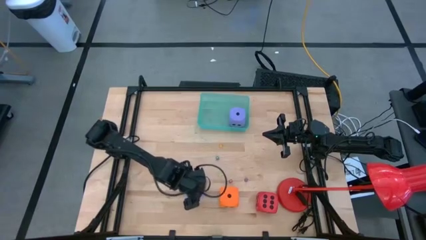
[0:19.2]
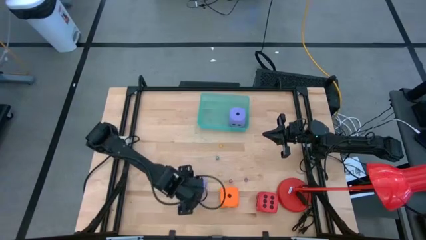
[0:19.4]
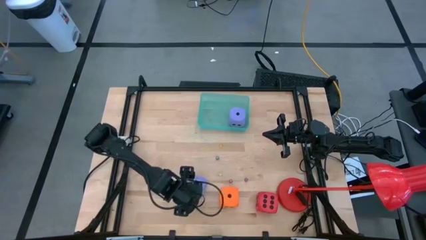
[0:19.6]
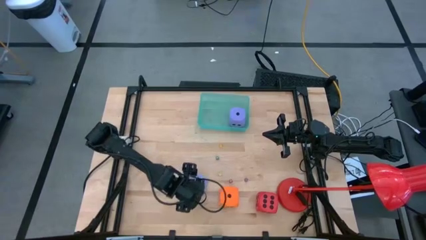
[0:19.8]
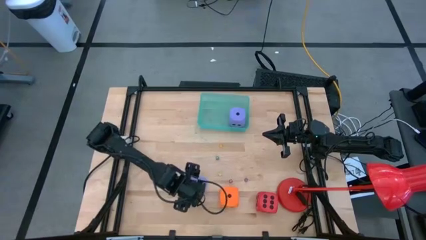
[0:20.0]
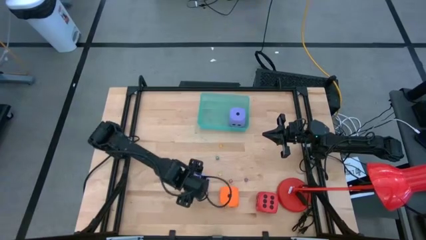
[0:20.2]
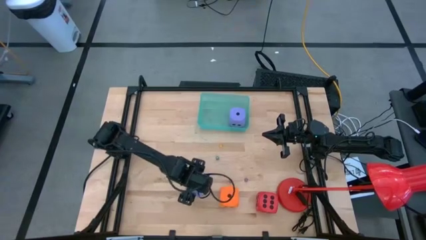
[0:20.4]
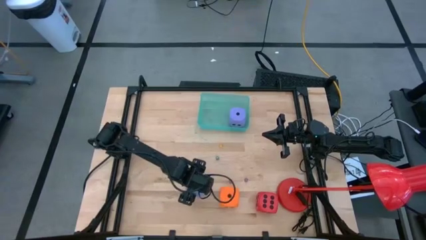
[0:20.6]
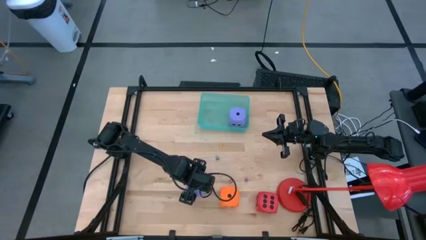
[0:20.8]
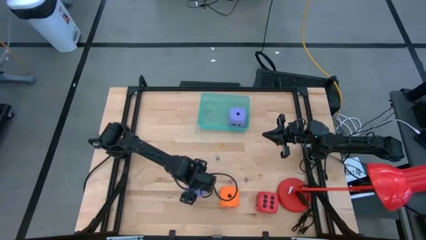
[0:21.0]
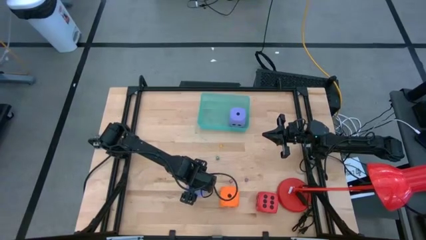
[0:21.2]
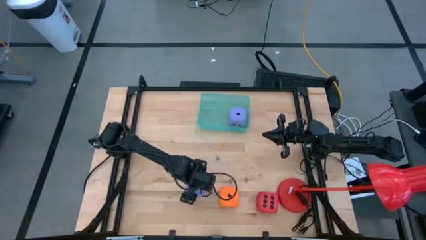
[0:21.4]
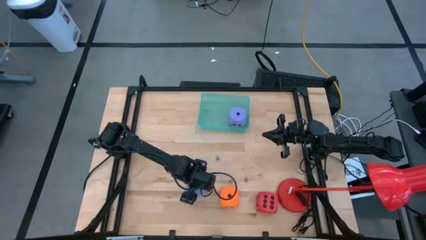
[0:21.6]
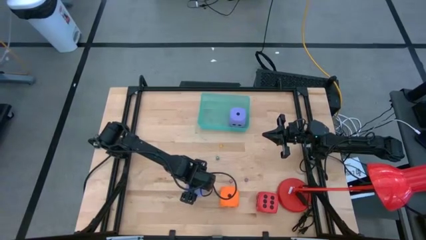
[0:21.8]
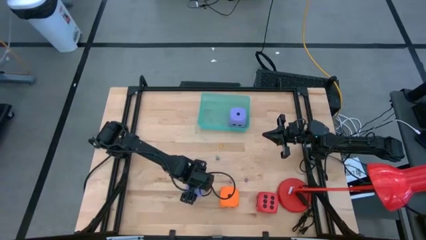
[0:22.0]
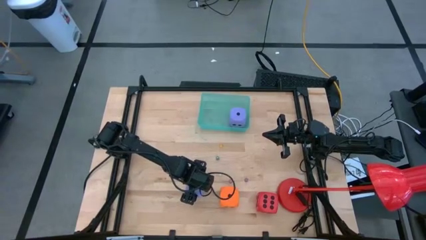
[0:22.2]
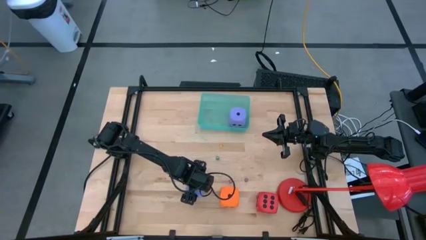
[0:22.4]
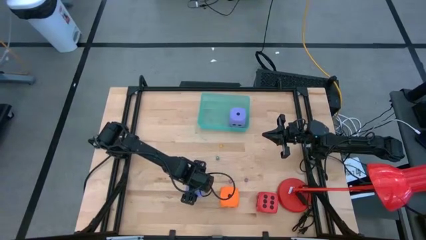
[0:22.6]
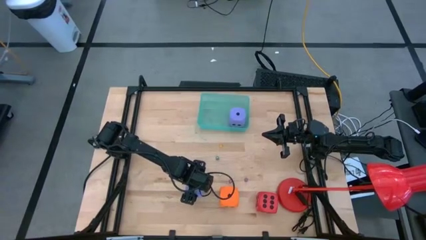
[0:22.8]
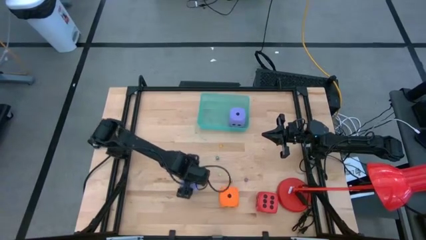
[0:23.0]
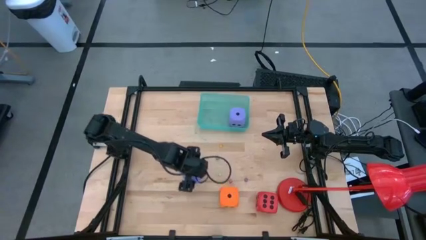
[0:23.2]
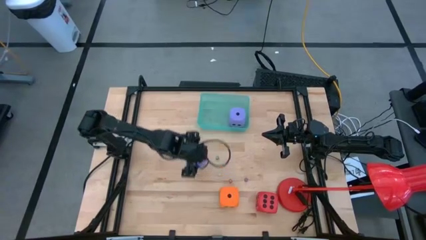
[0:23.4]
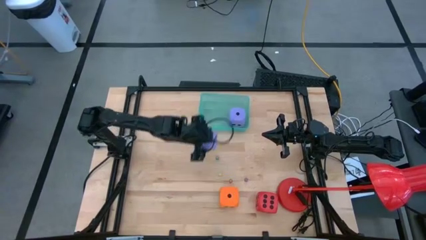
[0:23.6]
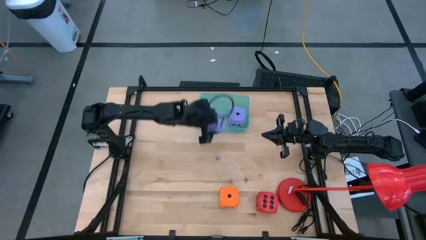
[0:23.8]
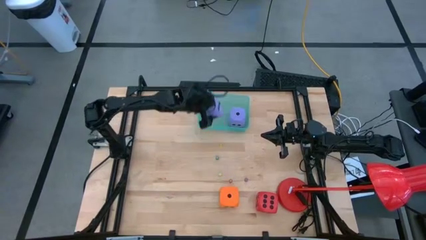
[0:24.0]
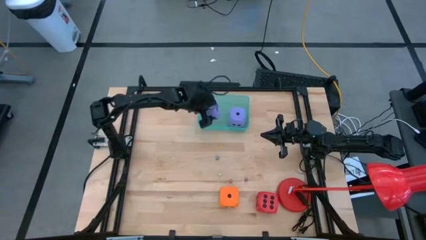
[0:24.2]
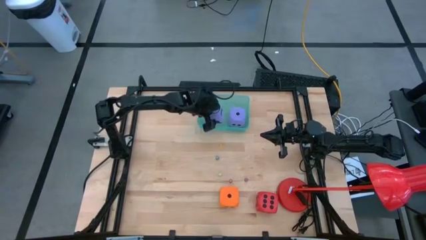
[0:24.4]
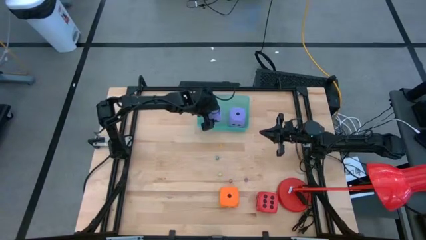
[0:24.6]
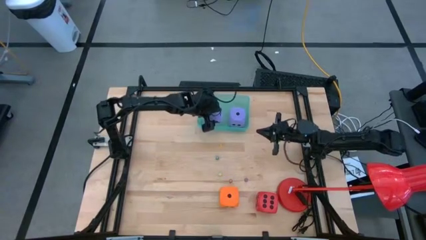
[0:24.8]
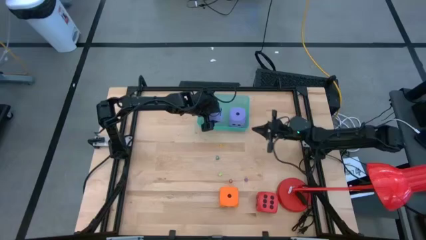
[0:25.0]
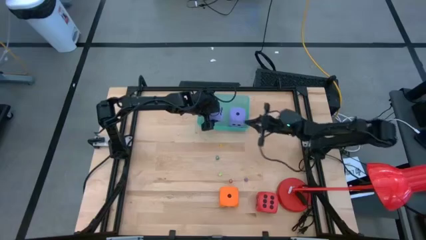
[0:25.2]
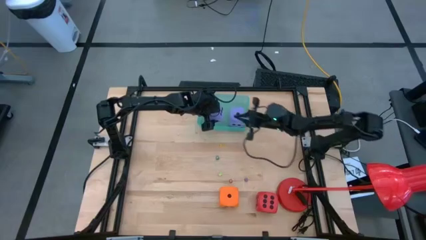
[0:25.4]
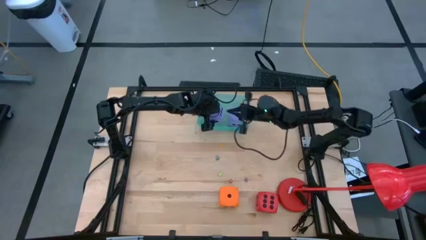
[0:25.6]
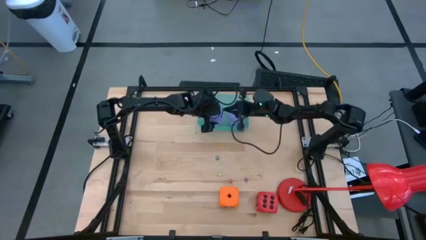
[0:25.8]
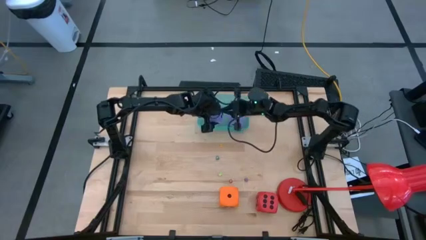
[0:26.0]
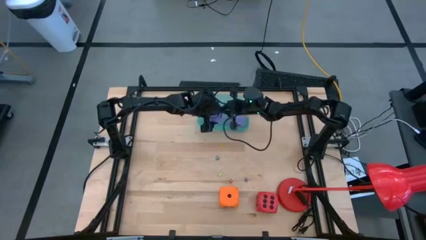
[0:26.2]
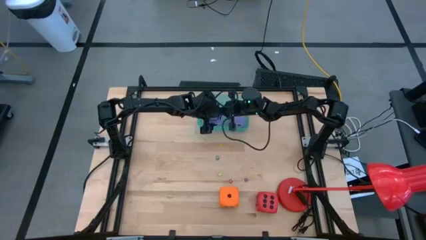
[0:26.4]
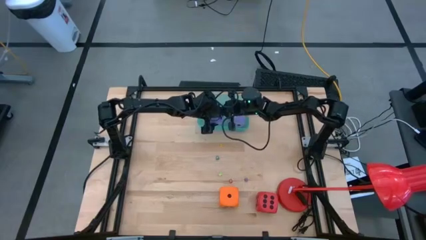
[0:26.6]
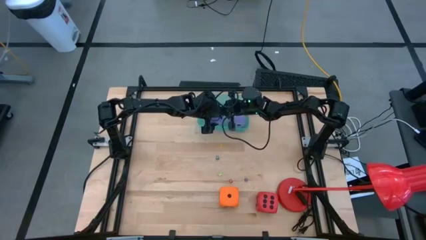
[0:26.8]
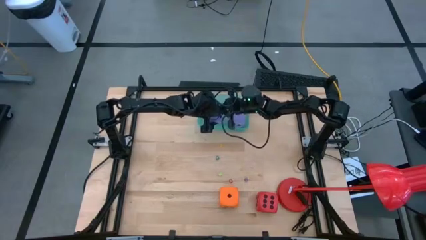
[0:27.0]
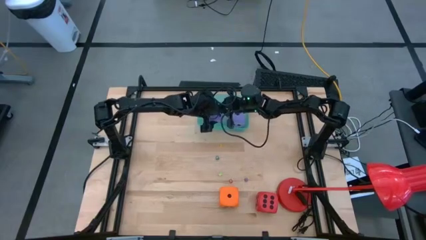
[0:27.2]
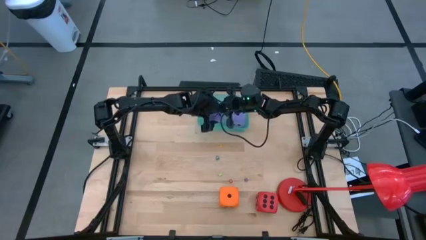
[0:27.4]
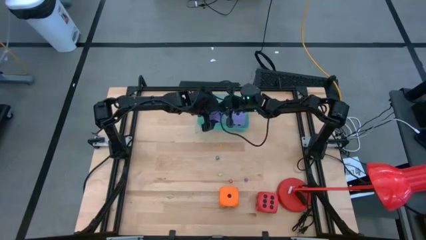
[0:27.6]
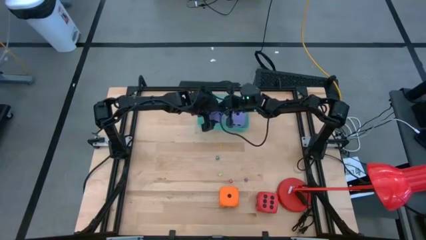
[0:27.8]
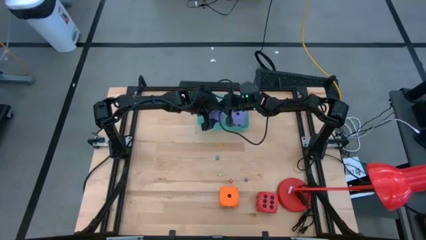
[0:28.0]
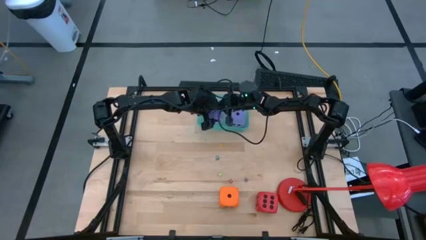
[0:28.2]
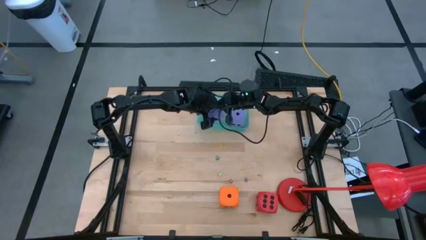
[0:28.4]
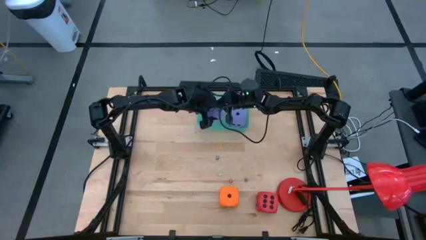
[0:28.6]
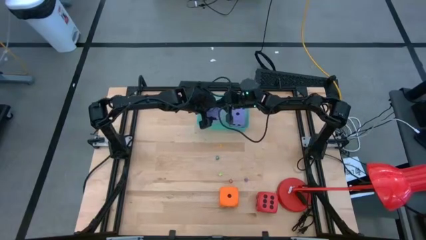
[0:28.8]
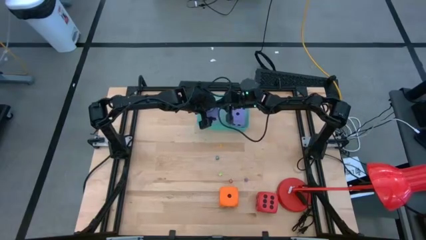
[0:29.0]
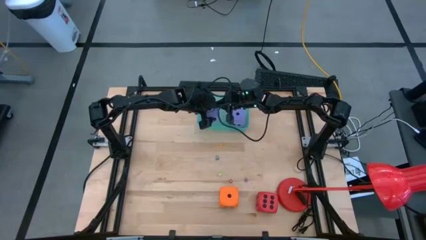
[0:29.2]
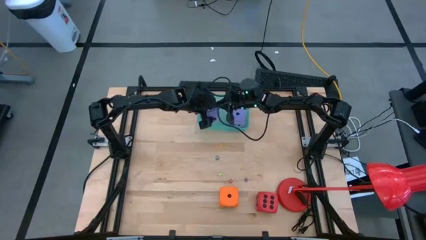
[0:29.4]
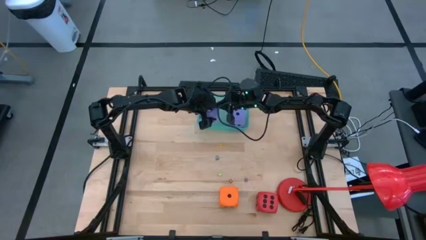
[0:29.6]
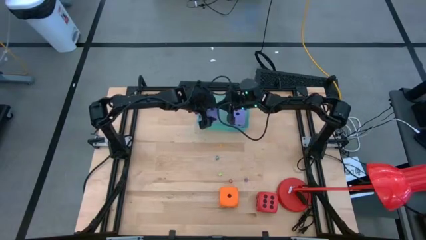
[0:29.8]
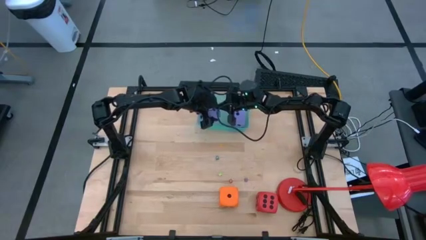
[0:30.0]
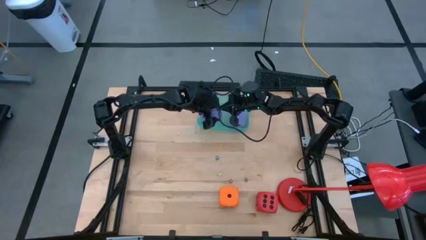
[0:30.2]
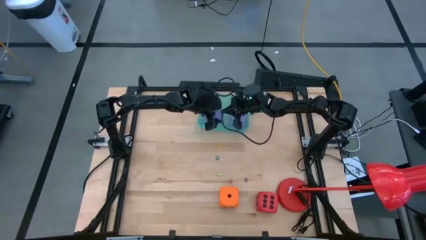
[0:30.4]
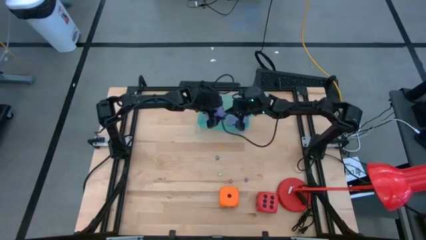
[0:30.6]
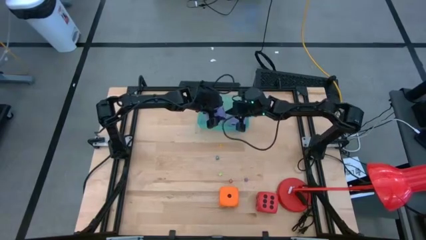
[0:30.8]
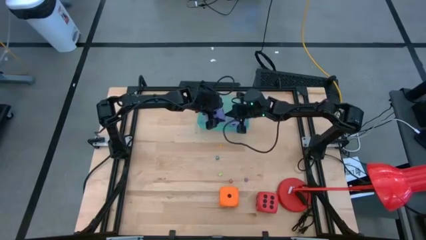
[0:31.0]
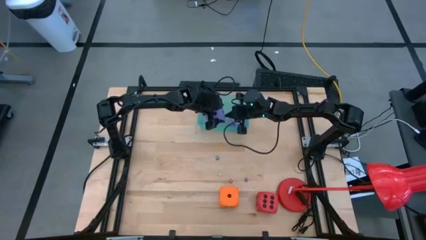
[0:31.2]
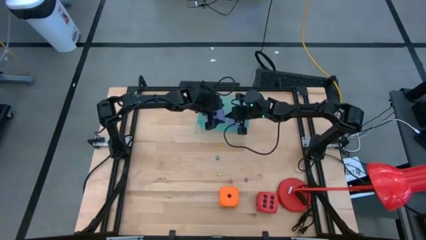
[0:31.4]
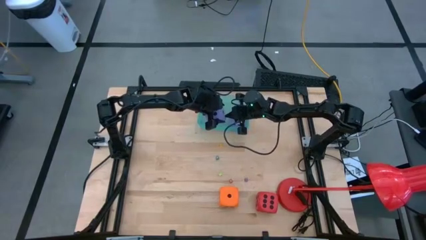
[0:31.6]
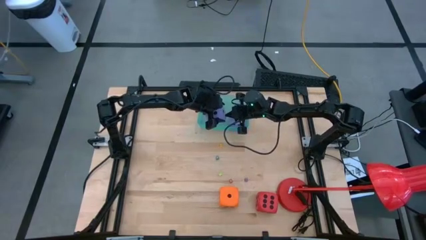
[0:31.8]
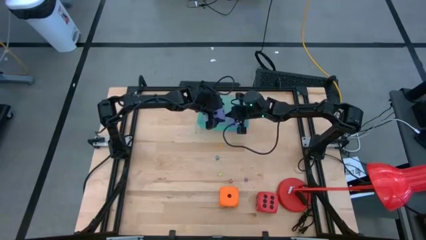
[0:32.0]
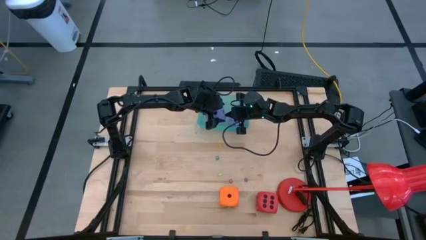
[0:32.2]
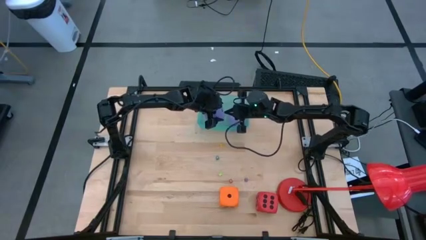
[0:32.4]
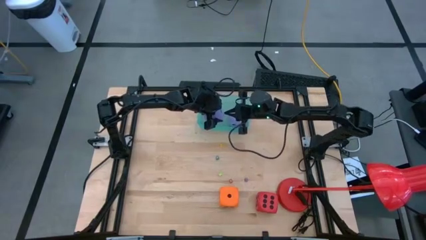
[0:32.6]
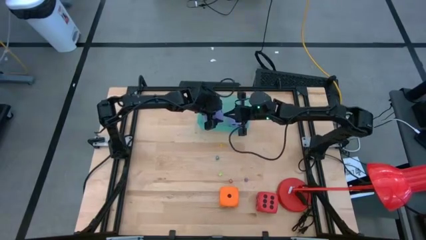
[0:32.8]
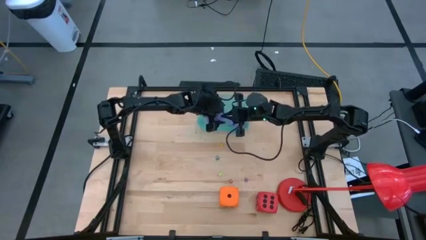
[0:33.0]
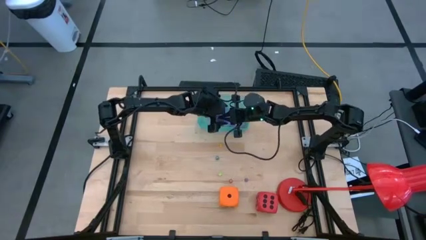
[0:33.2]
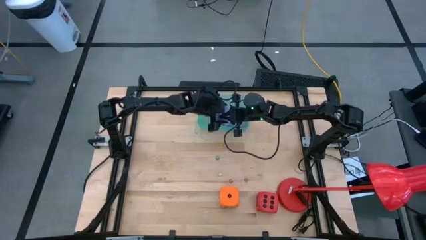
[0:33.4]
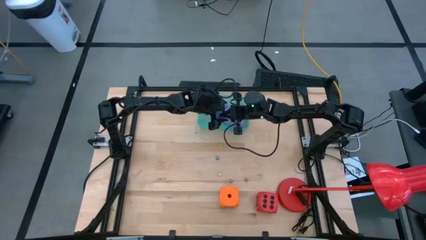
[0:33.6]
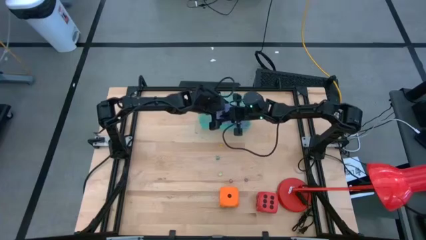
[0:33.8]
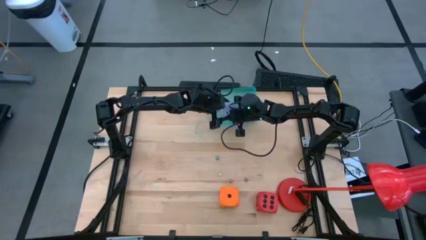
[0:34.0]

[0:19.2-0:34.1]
Task: Pick & Place Dice
Put the large purple dice into the blue transparent bin

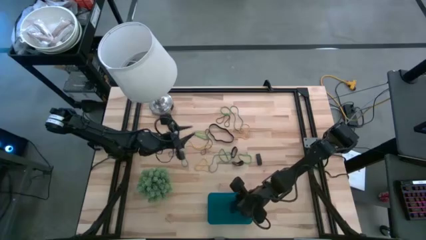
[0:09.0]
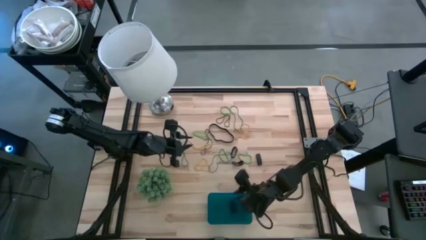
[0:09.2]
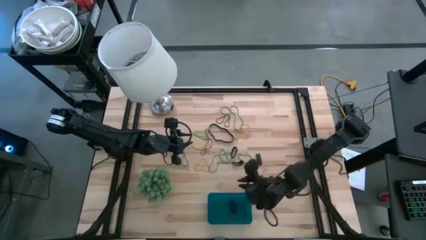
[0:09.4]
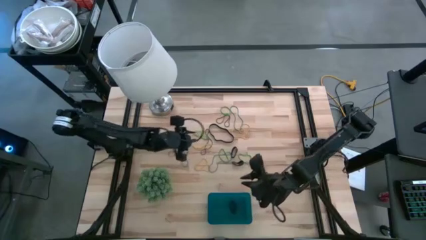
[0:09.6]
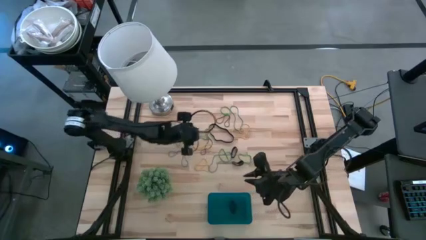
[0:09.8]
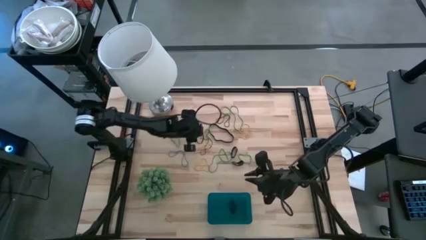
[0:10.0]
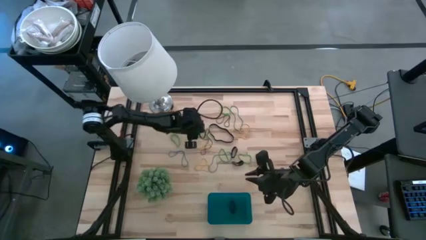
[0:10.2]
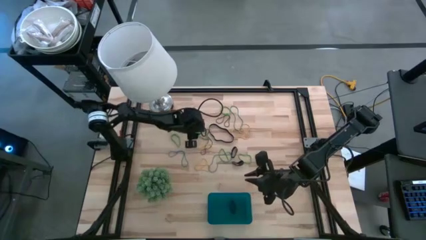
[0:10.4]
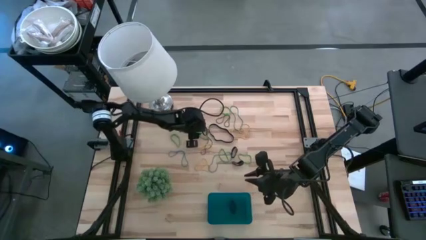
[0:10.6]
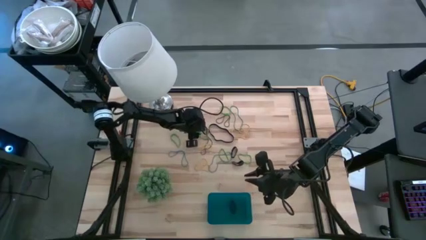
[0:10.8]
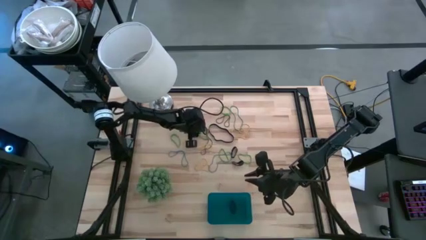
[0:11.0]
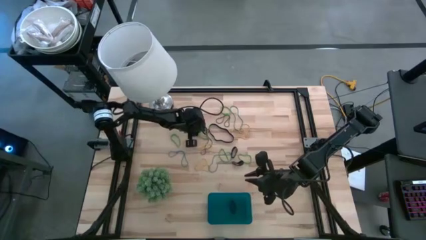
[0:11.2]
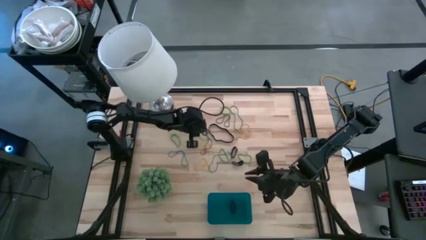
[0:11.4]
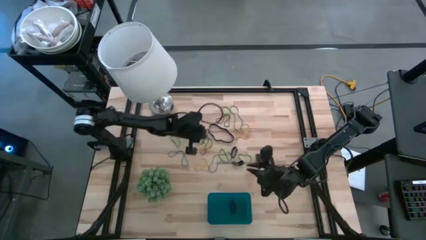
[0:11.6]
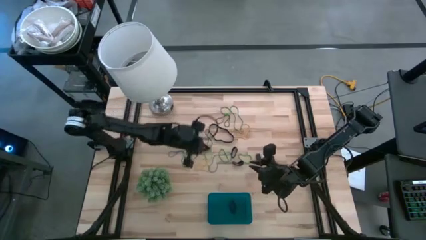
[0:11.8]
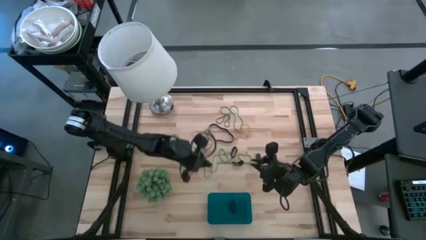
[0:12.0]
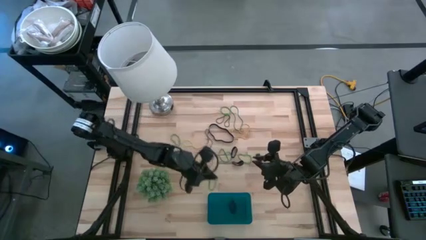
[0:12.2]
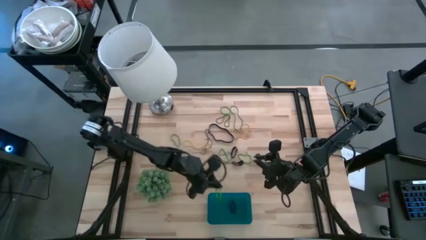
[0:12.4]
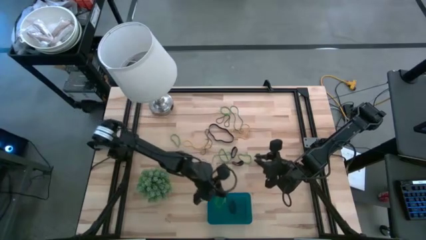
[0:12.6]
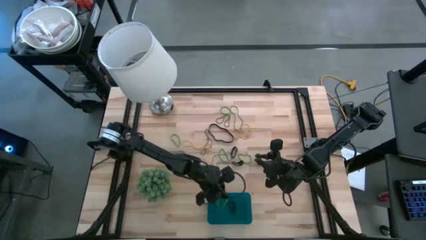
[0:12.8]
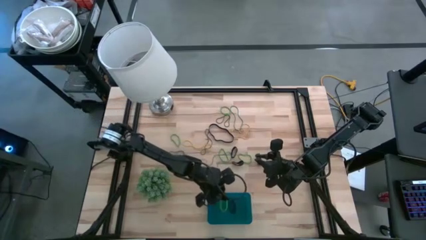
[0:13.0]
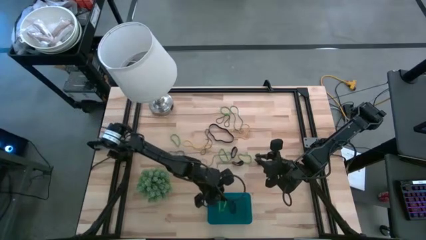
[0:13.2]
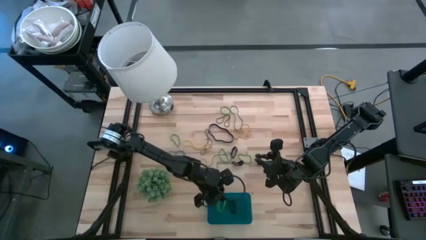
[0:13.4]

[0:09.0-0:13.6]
Task: Pick and place rubber bands into bin
Put the green rubber band into the blue bin
